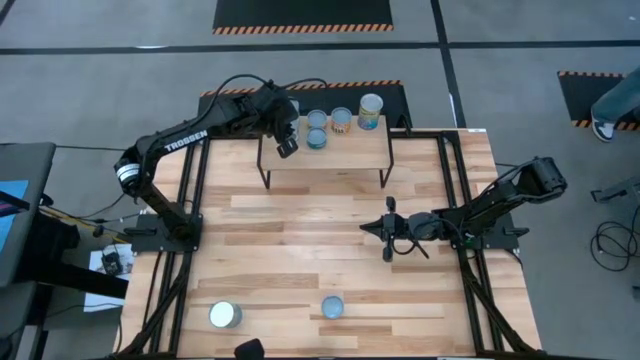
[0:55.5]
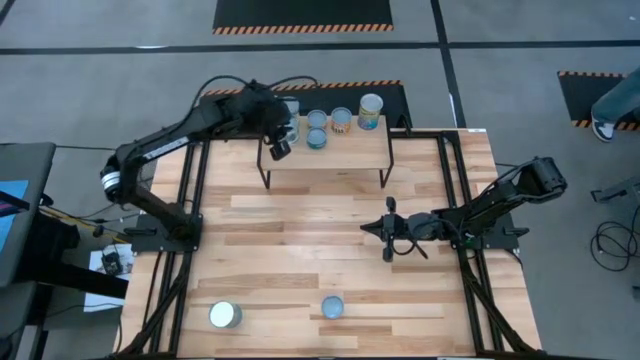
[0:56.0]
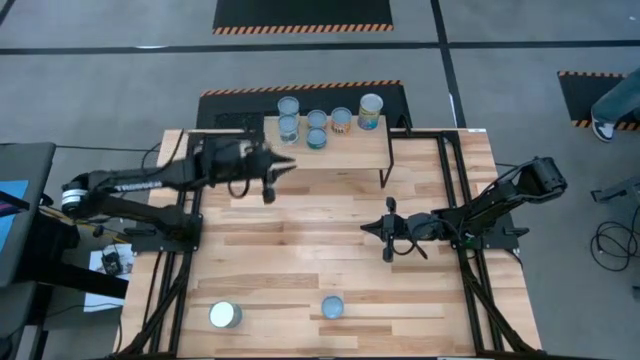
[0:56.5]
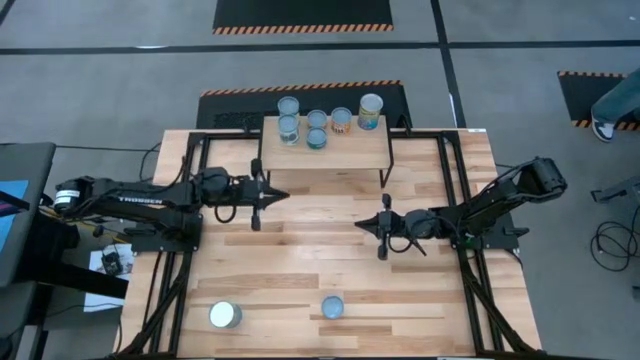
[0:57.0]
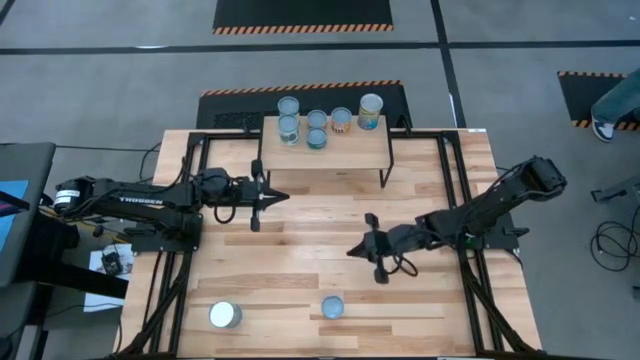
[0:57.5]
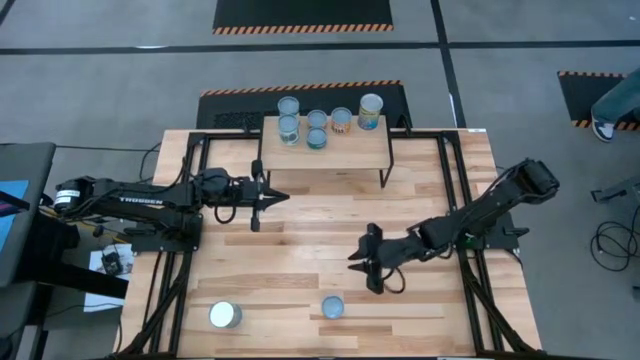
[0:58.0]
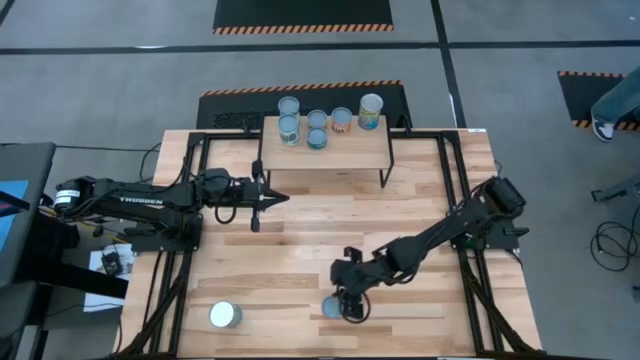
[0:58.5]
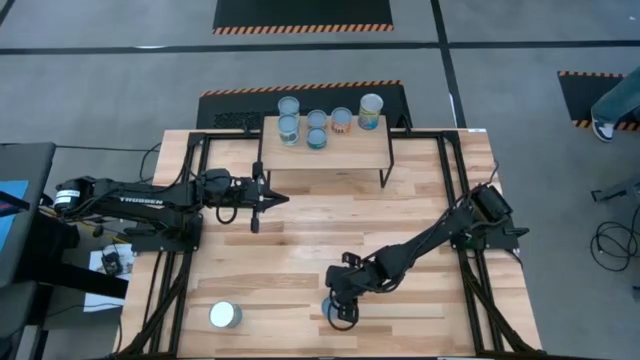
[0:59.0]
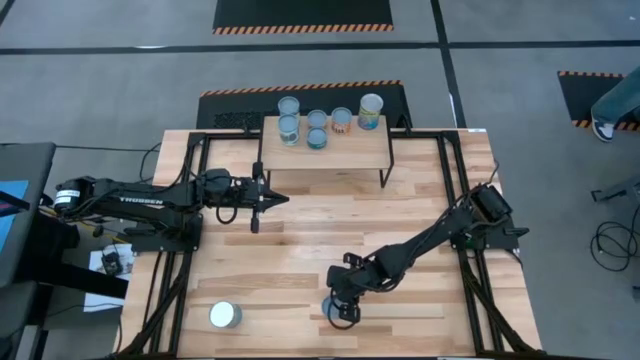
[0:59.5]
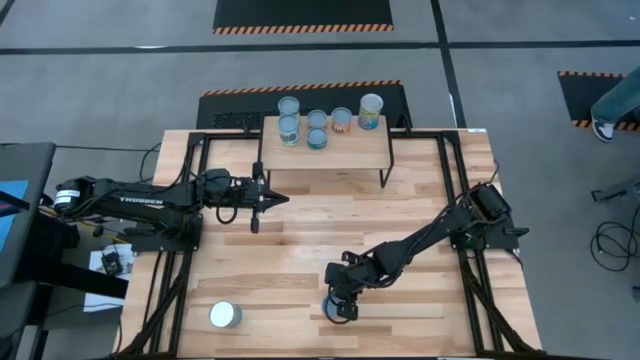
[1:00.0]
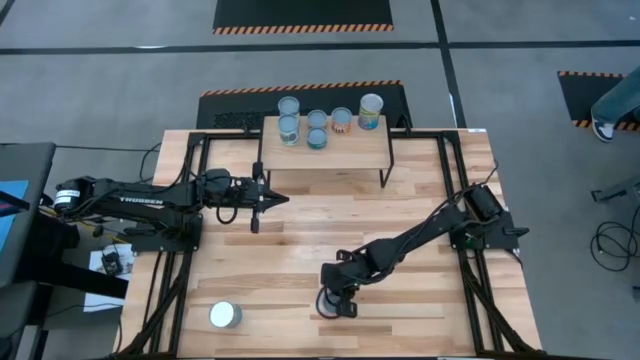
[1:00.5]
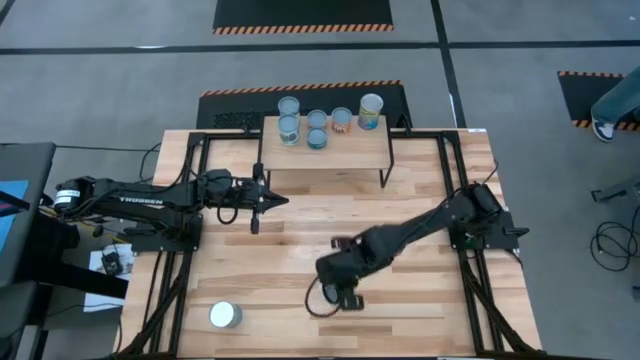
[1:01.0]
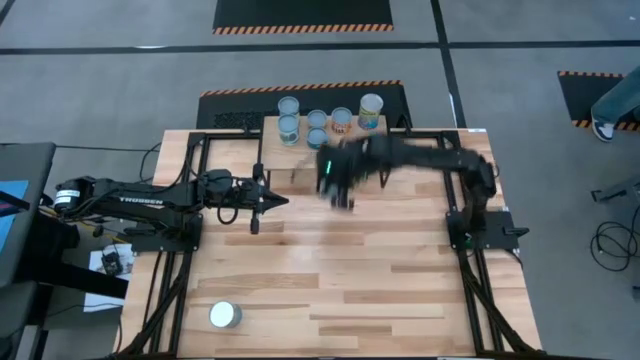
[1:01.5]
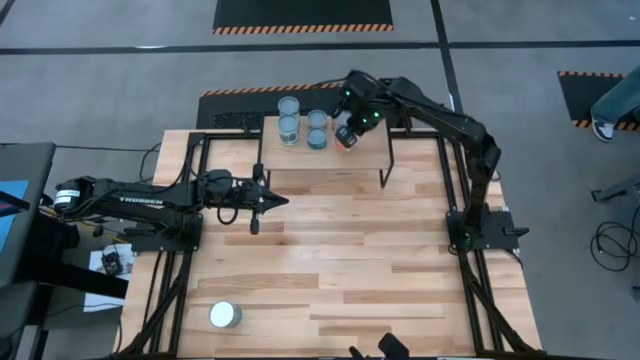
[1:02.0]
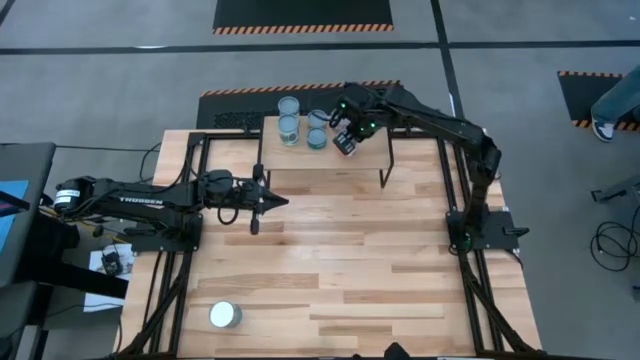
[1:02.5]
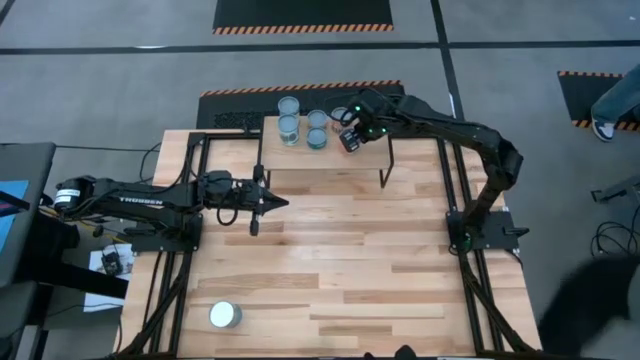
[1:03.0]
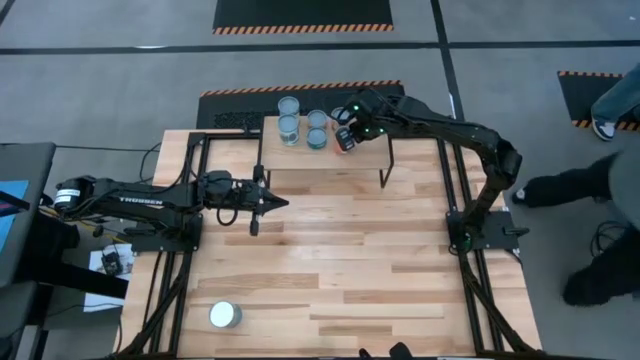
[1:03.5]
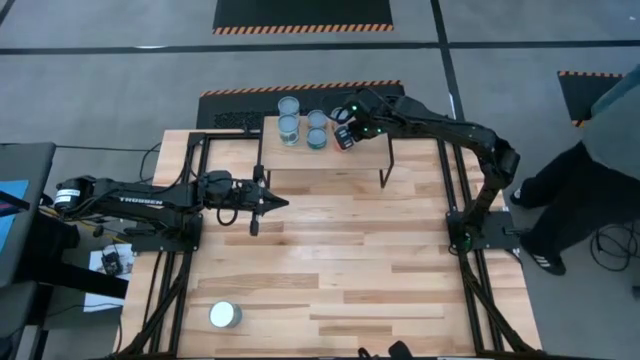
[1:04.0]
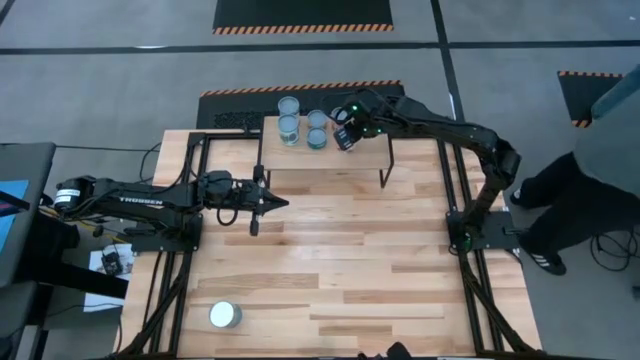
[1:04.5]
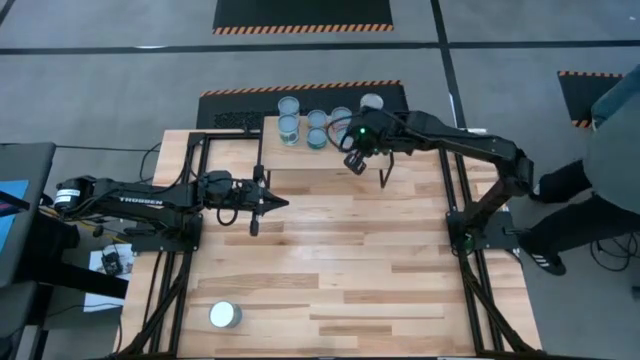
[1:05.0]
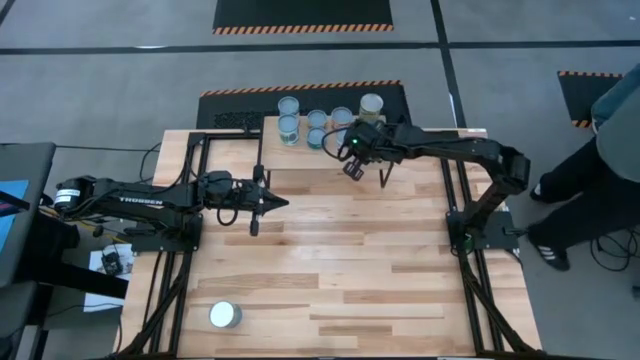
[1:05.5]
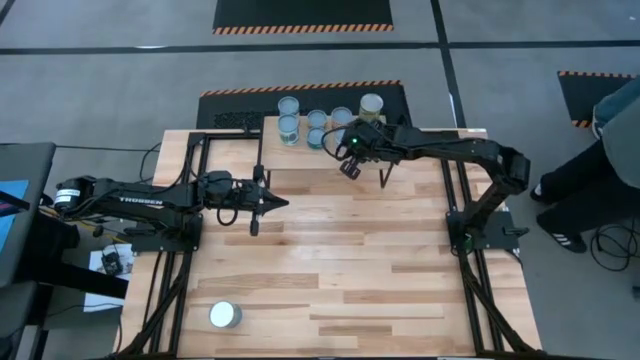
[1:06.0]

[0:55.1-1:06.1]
Task: Pick and place cans onto a shelf
Put the orange tomato can on the shelf

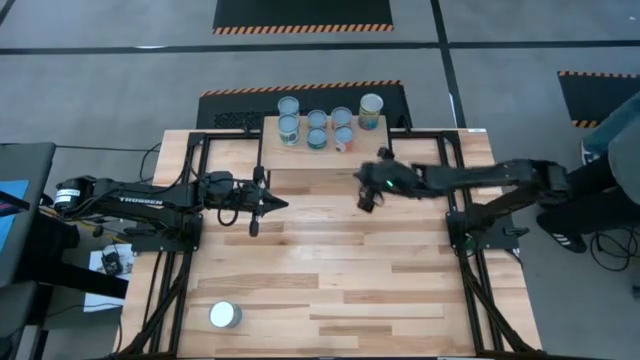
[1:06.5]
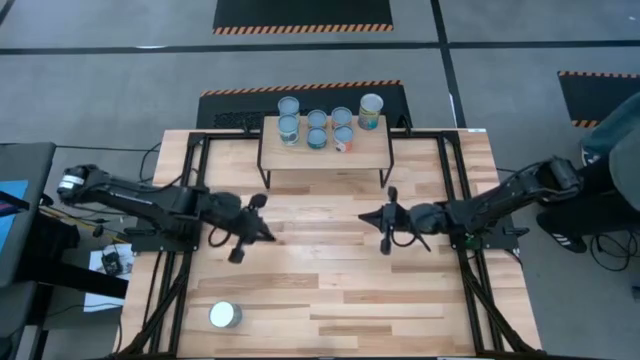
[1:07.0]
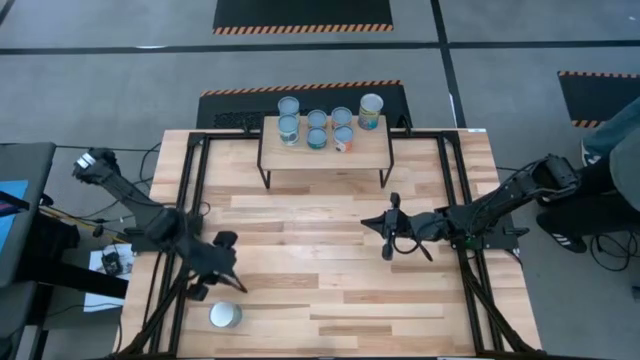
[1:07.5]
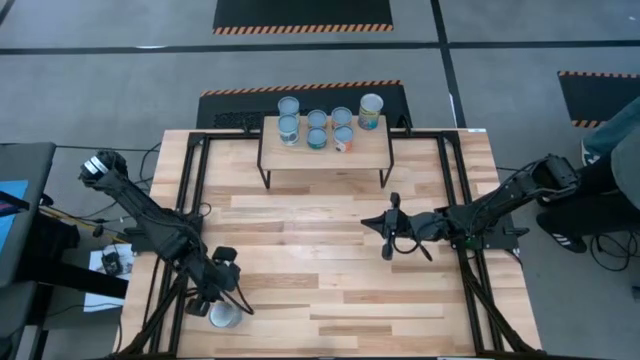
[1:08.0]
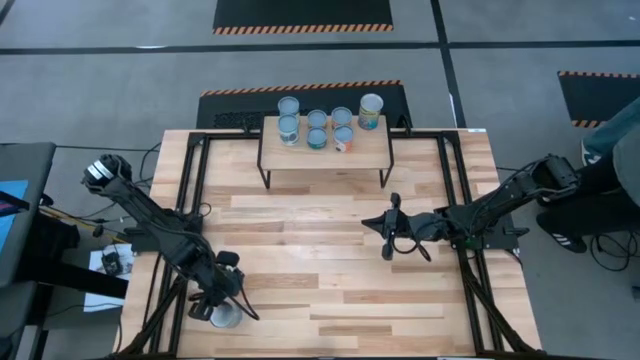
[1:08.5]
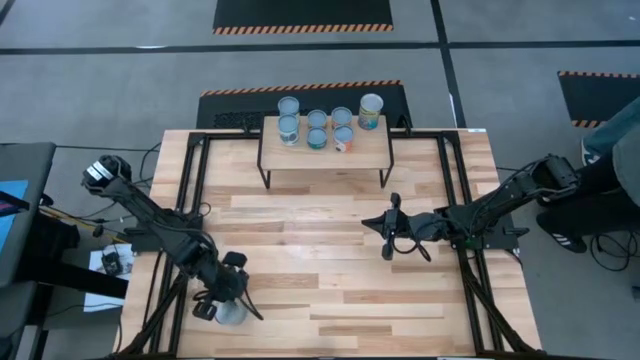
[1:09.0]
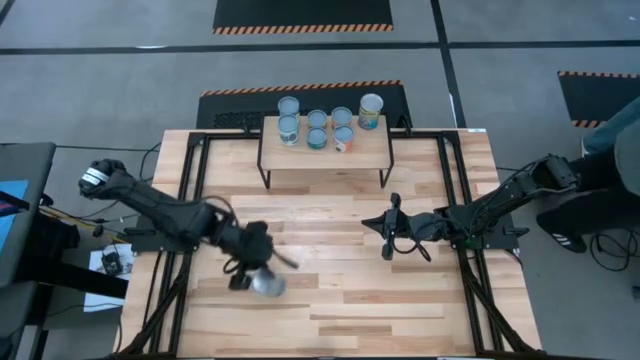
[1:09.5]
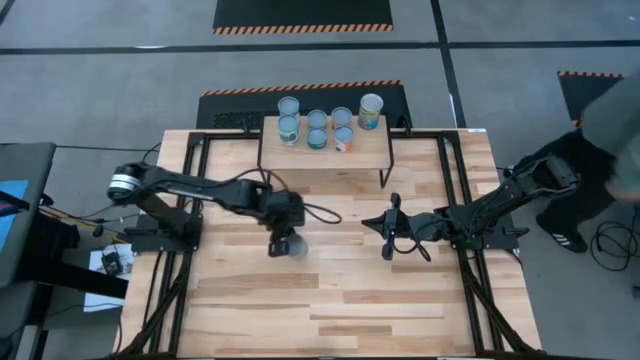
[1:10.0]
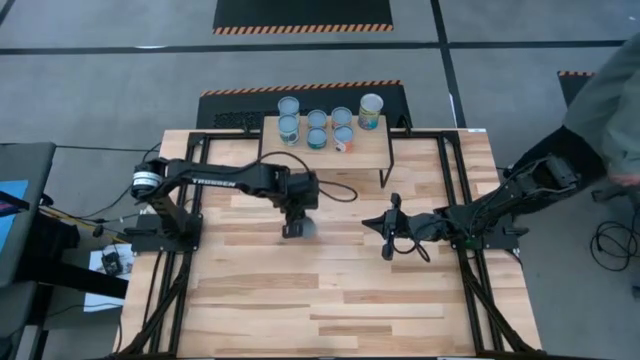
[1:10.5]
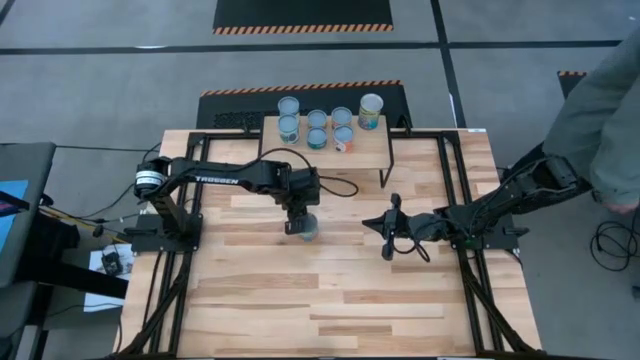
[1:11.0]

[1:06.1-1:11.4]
Put the blue can on the table

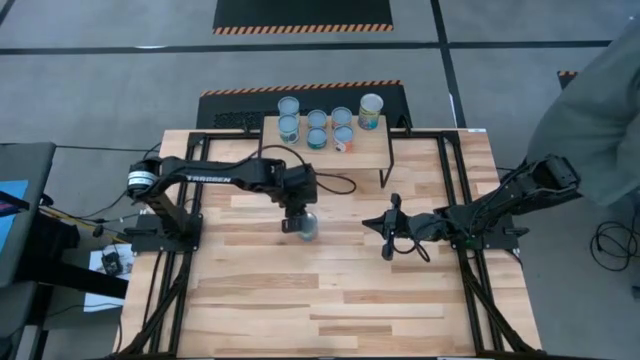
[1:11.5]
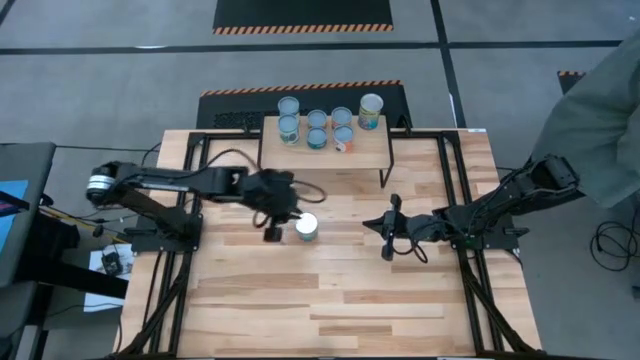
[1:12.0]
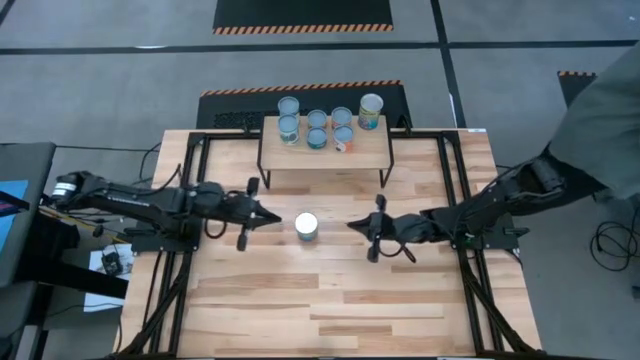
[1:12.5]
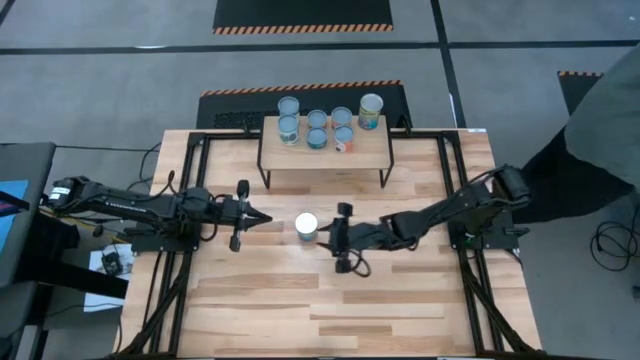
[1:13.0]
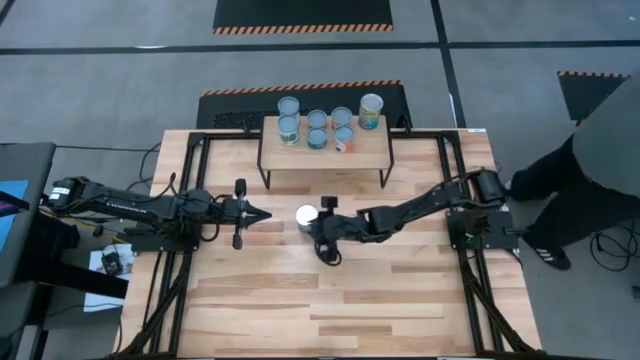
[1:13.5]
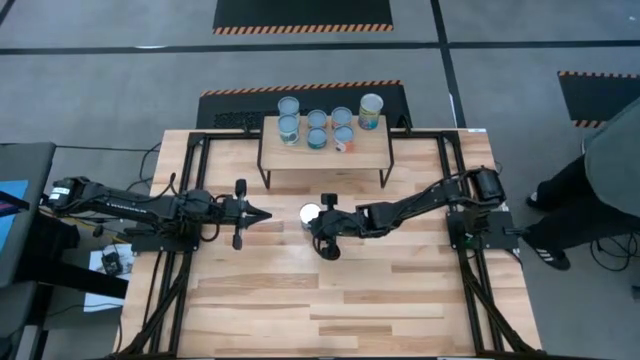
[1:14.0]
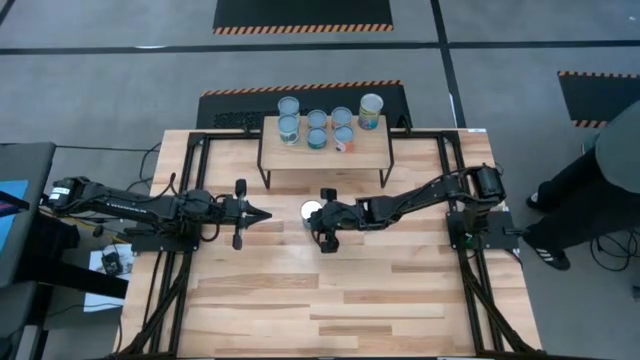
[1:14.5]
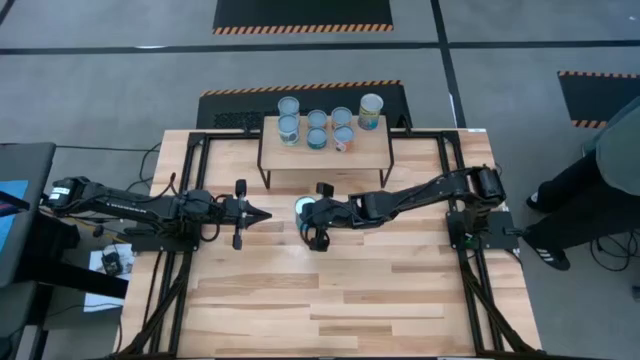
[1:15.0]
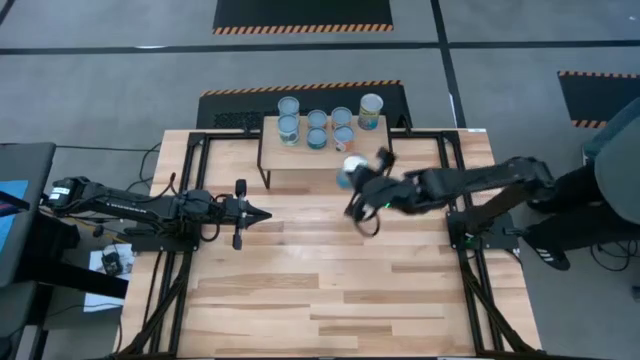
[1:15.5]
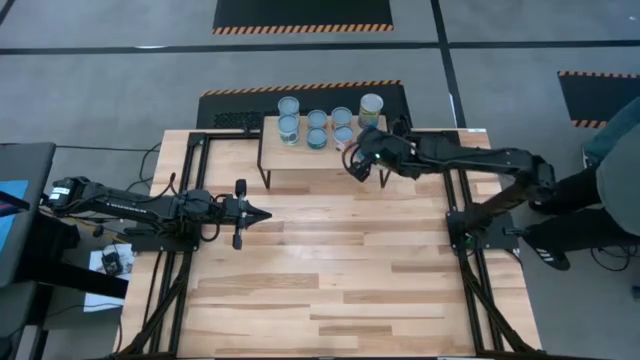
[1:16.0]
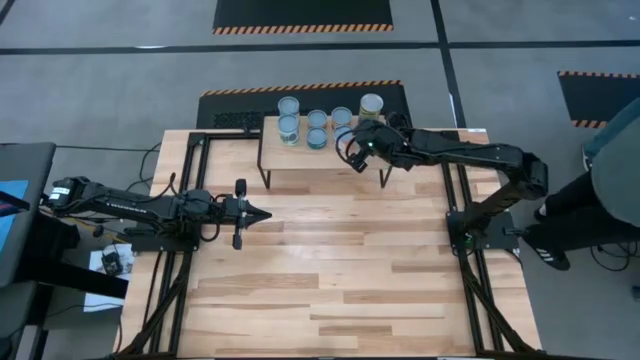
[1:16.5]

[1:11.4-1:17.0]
Put the blue can on the shelf
